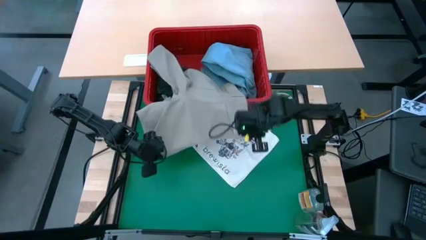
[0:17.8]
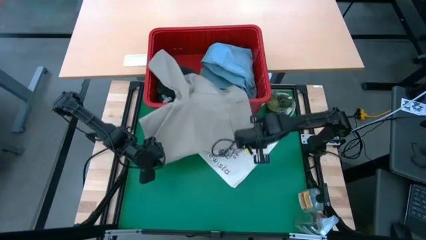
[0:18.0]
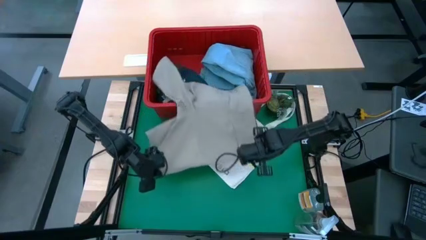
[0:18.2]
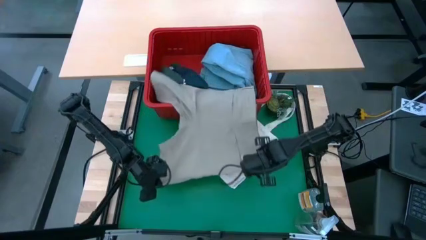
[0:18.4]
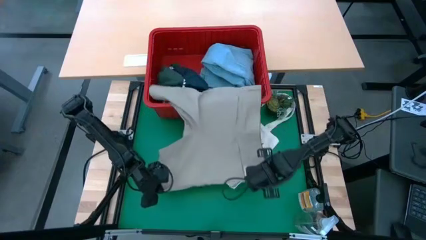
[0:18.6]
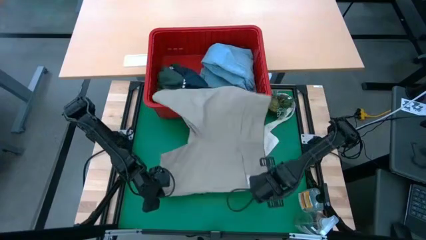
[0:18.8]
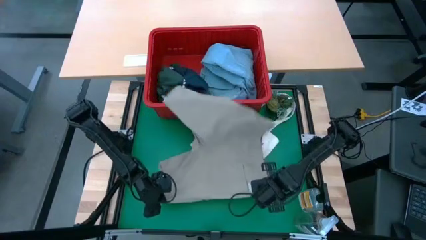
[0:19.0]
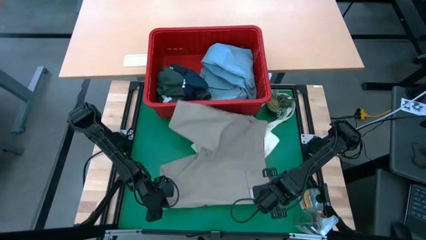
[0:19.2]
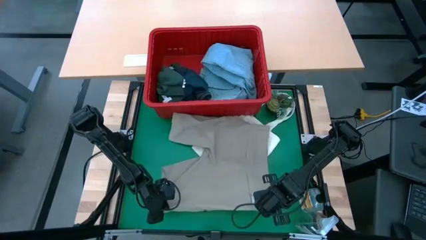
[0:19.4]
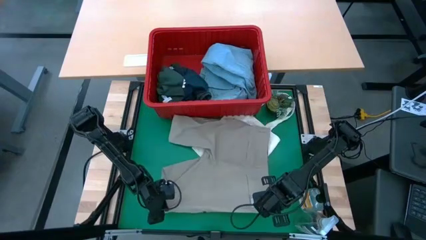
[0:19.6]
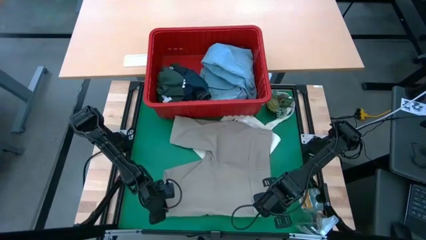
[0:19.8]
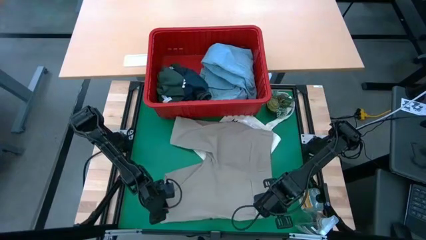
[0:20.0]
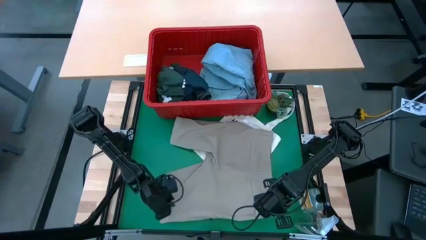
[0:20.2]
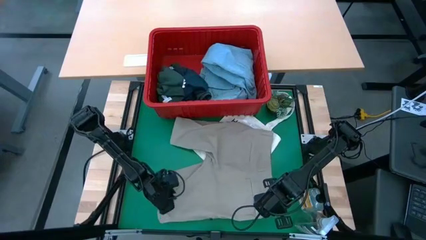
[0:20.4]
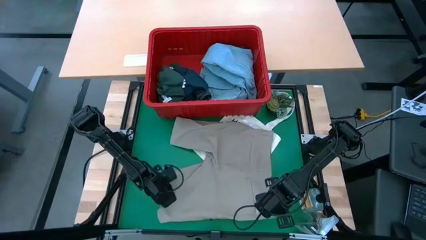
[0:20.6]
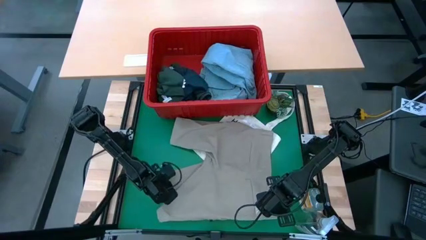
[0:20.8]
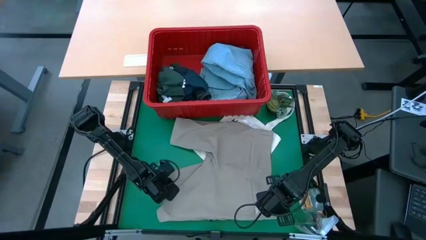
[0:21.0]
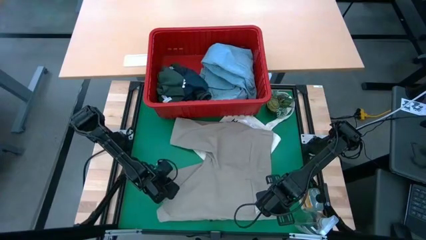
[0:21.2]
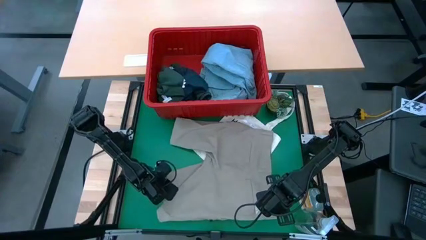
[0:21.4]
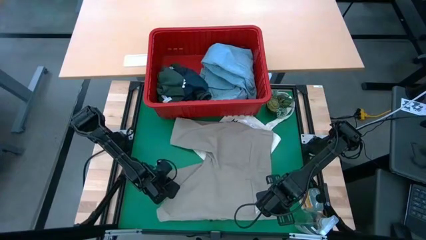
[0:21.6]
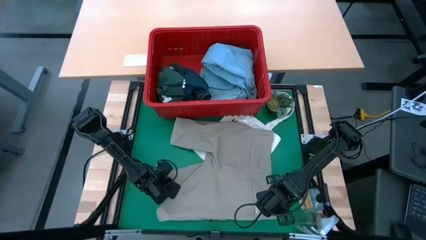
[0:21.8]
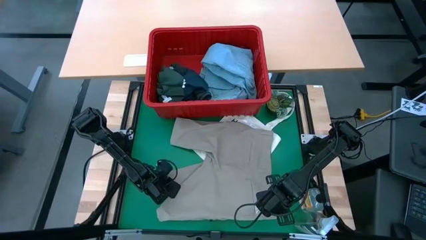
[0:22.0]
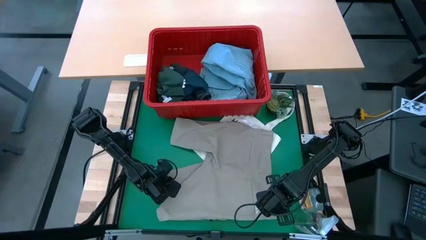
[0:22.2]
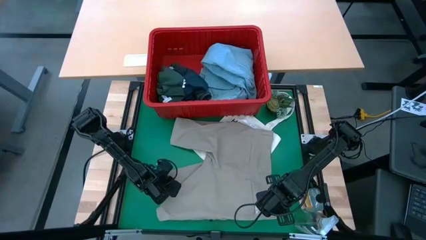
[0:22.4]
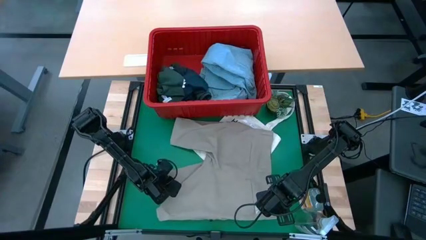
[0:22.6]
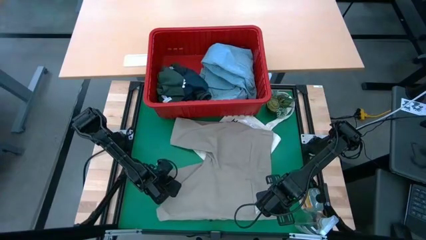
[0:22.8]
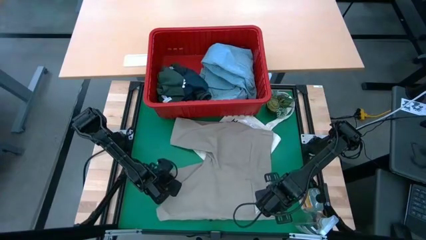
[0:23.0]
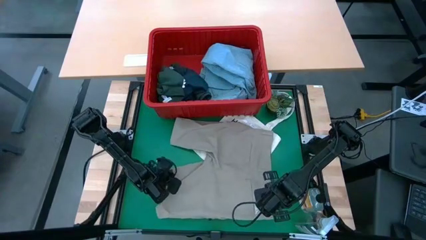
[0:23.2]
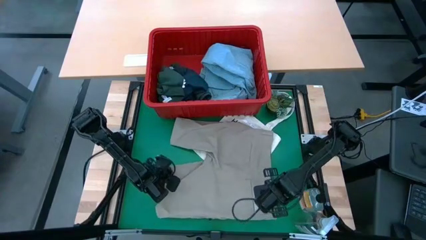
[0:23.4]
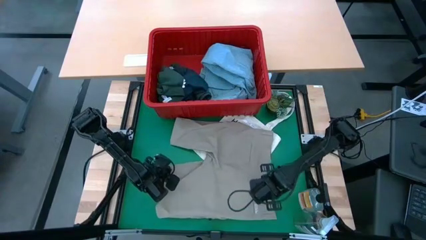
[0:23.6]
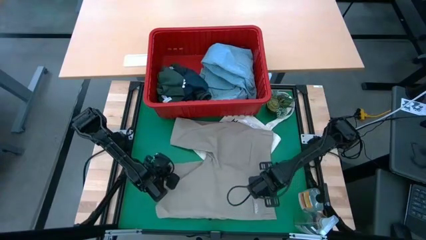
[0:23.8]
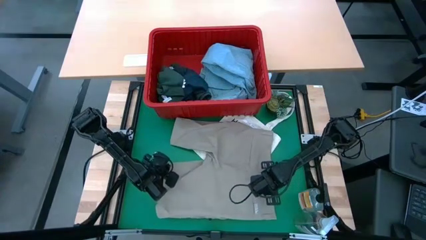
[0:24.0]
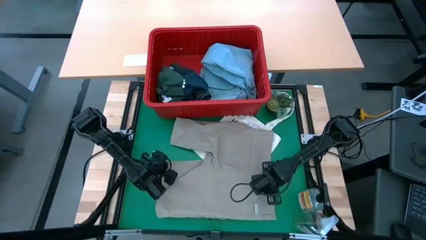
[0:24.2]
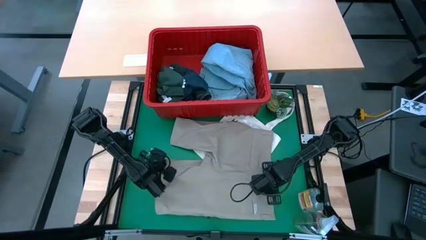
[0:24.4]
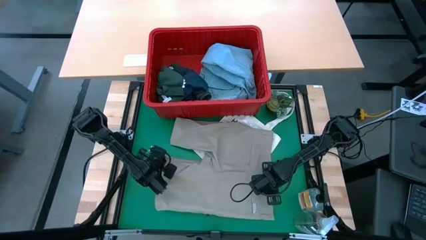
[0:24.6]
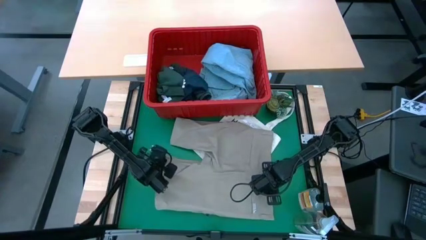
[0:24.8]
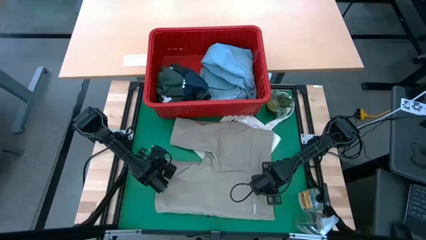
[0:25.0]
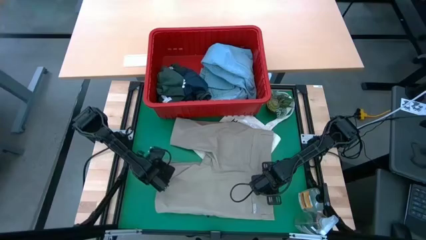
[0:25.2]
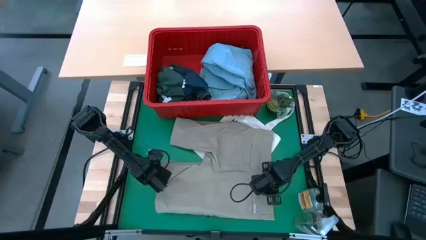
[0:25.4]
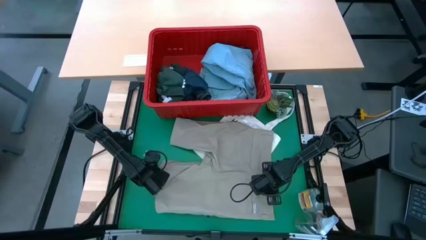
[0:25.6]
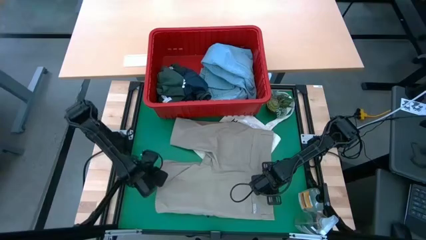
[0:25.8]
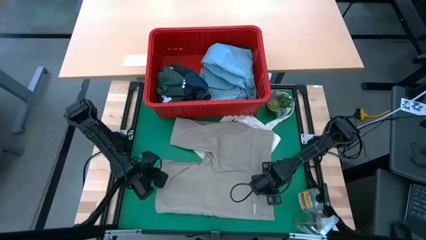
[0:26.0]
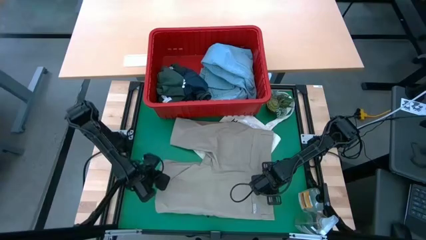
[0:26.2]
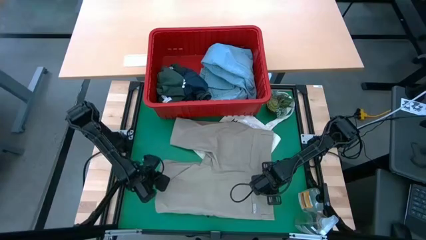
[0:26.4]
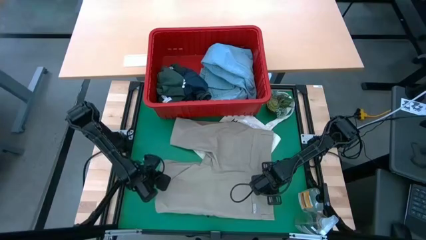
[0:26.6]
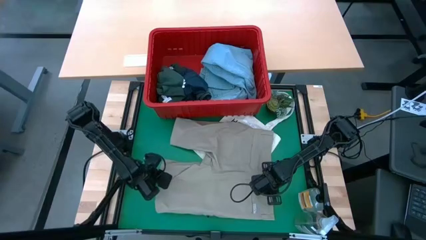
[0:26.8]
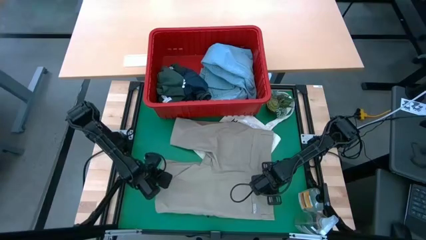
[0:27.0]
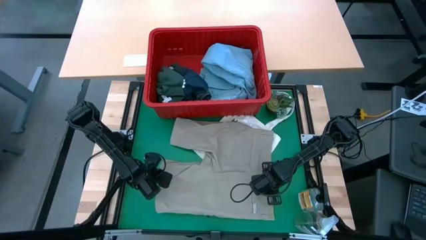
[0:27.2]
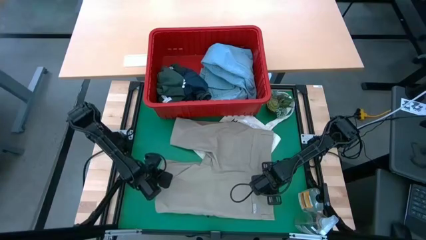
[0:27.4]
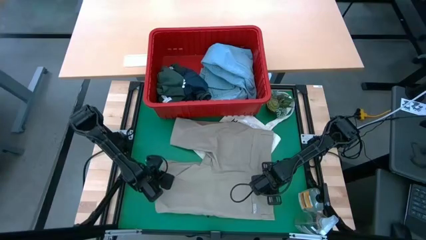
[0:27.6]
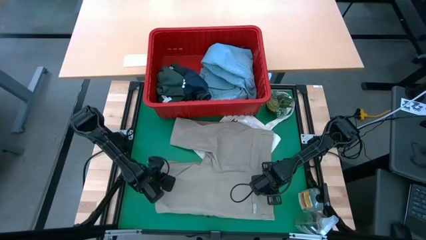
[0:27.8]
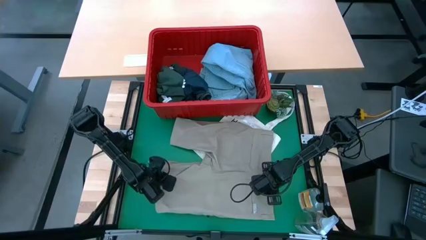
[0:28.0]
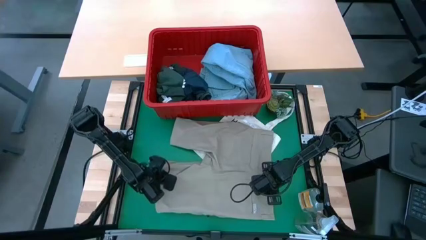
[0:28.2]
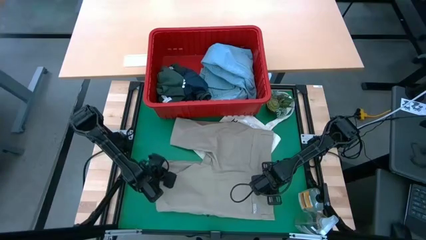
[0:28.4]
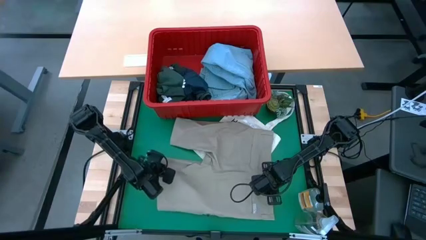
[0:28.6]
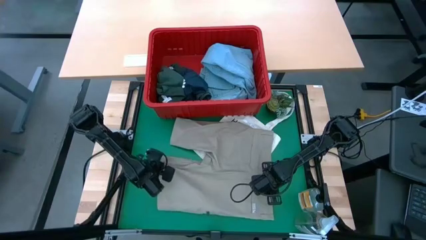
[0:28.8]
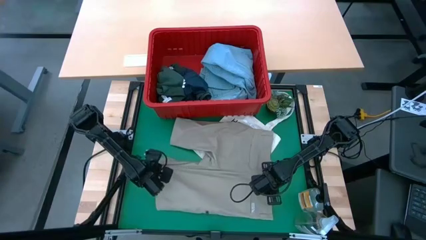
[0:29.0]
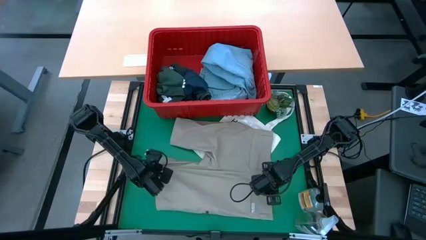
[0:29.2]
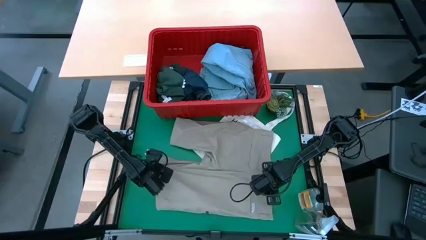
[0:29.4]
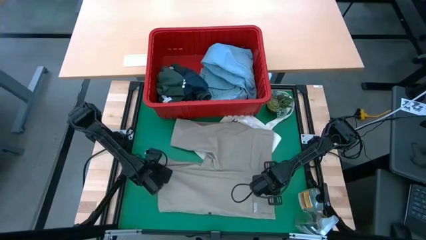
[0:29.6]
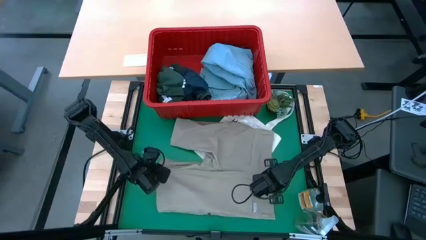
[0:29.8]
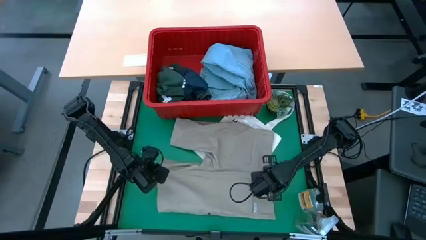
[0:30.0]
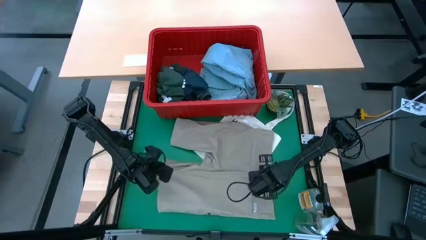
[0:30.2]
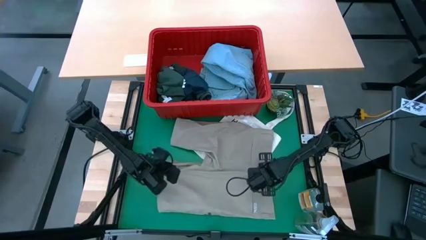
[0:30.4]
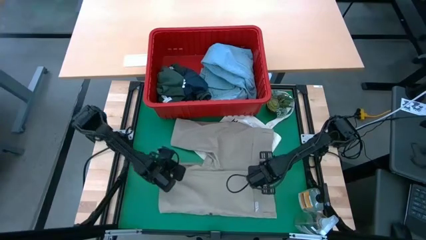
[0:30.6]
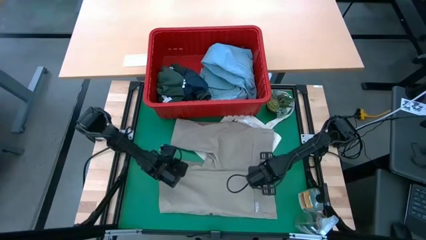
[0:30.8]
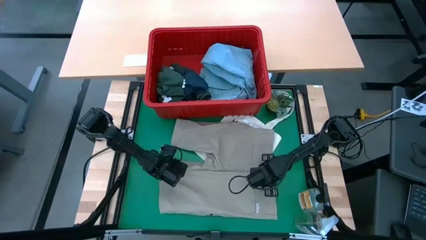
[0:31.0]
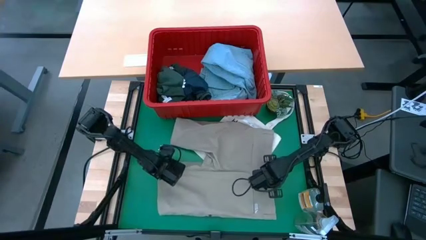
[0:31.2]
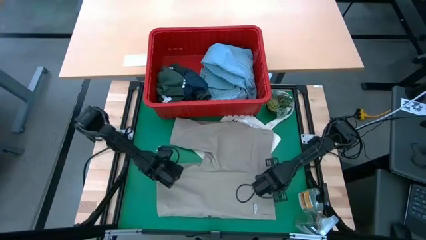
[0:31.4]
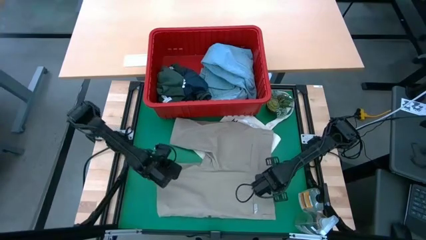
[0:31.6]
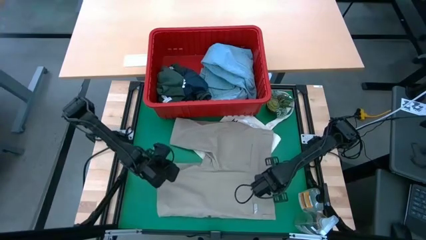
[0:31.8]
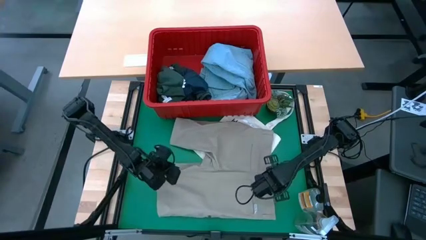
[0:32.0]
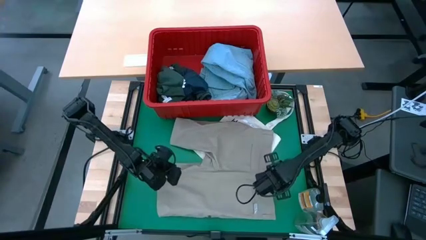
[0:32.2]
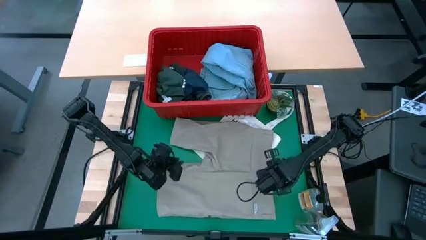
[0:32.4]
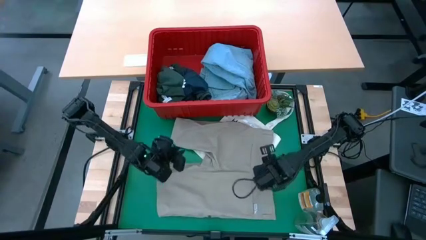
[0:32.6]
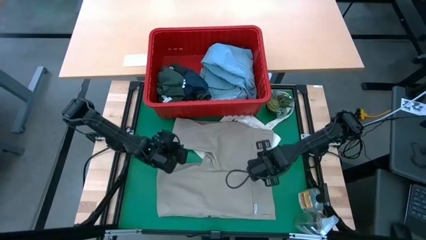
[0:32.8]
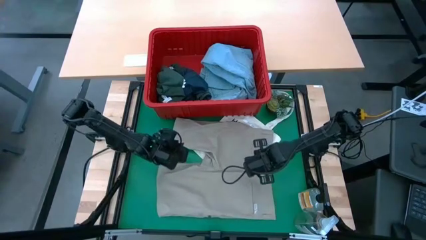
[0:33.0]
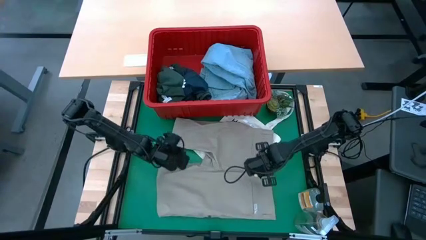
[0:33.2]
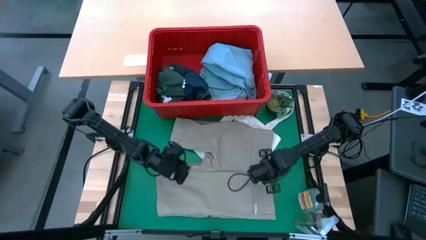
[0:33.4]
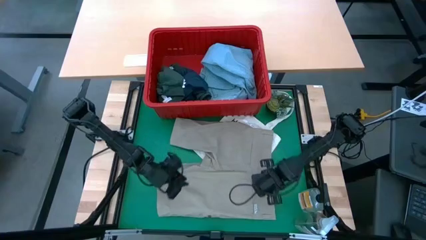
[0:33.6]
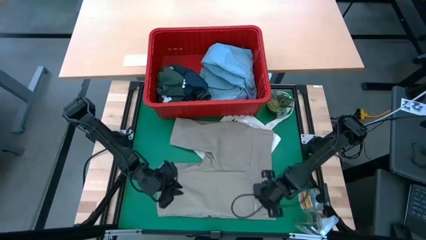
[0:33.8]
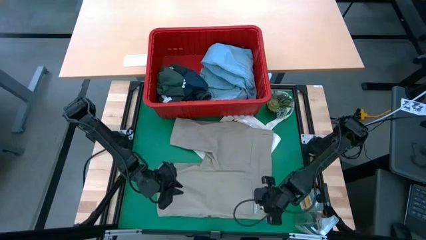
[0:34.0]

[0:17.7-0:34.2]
Task: Fold Laundry from Bin
Fold the brown shorts
